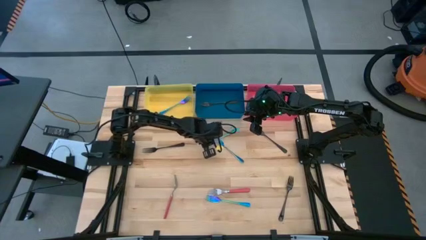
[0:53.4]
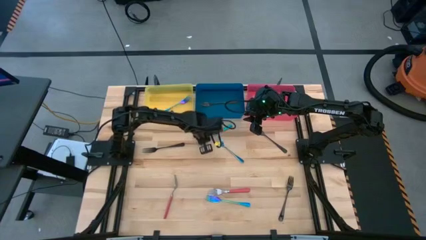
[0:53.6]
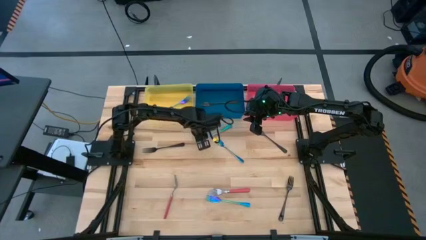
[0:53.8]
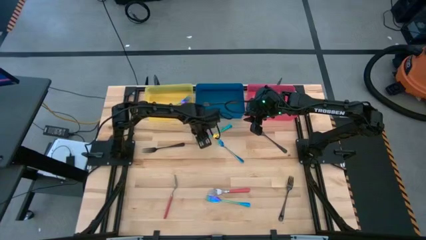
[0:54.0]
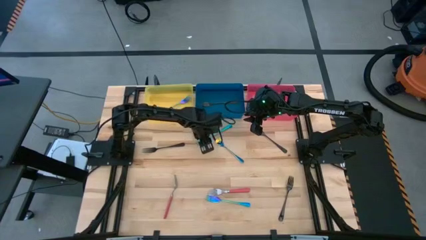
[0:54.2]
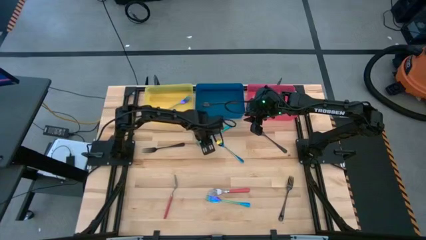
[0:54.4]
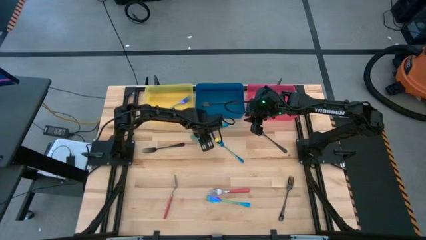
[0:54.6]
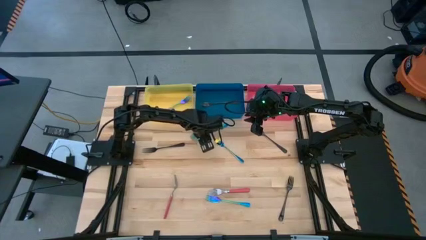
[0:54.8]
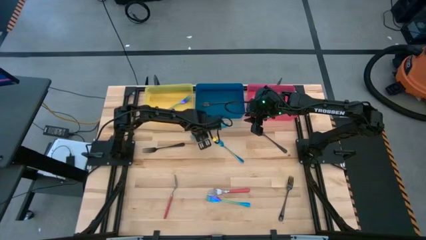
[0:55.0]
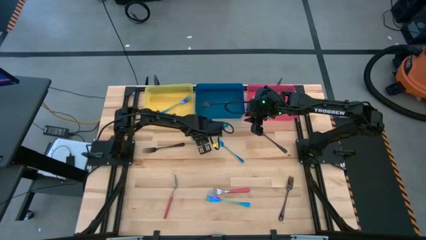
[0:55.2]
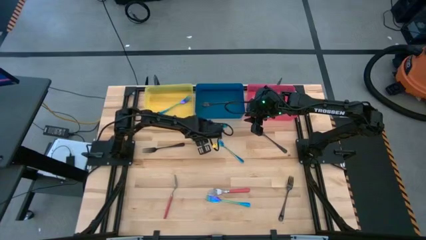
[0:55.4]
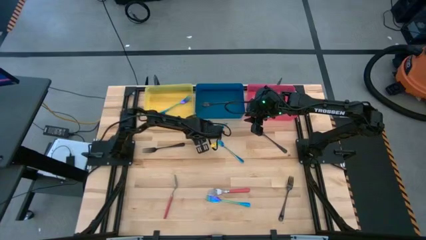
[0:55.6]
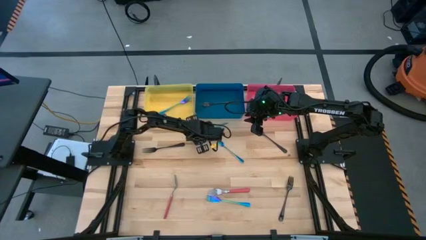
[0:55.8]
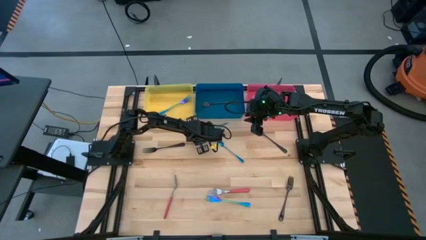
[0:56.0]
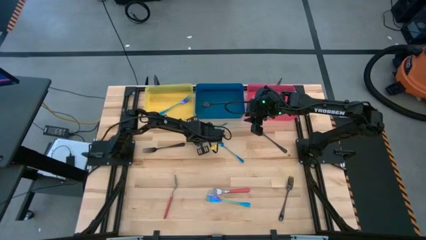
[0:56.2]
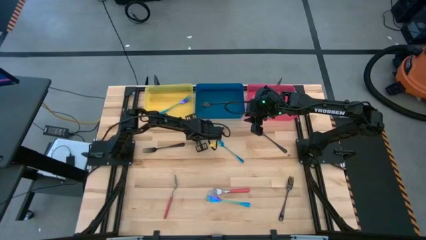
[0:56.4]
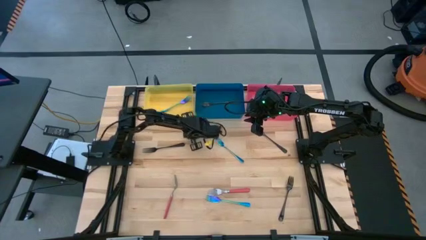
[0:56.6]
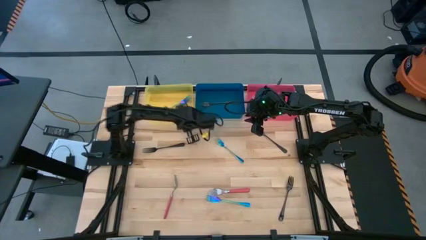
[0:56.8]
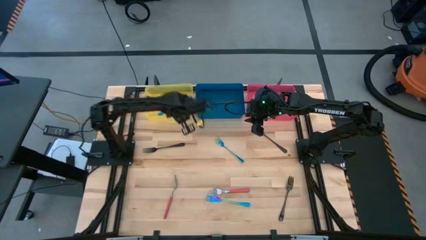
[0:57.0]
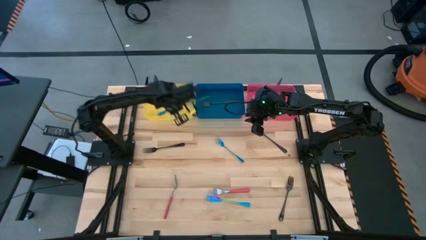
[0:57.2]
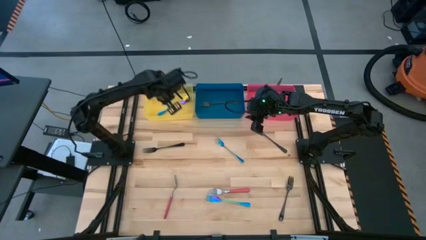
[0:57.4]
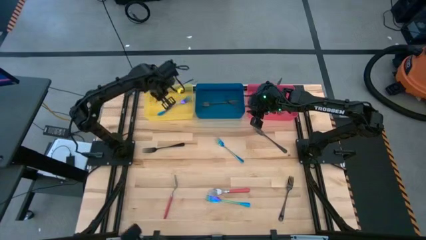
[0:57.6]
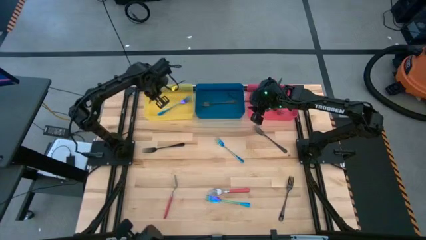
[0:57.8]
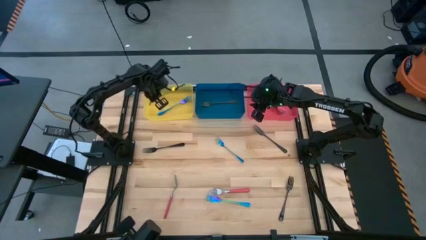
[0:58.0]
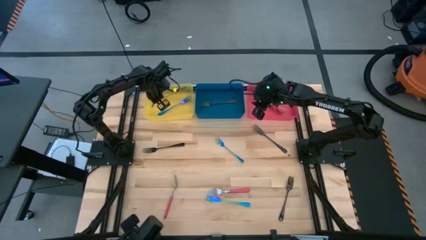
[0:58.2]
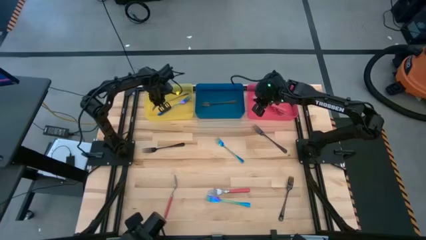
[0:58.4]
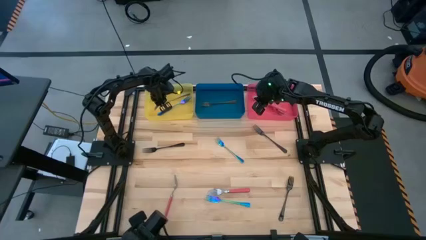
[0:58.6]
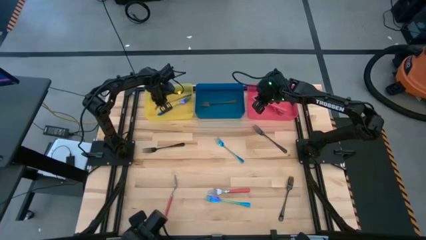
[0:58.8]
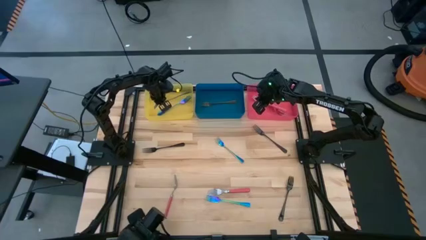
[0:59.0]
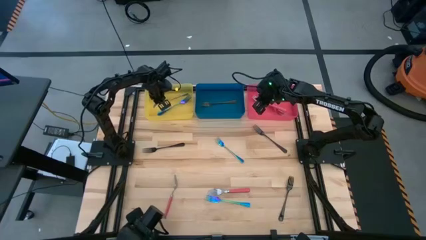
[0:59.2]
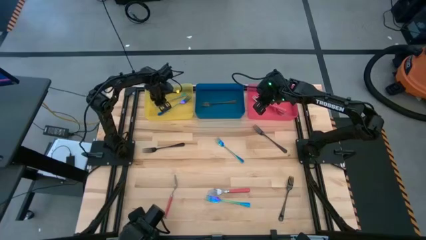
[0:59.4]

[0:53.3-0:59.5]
Task: Sort silverware by color (type)
Put the iridescent fork into the yellow bin

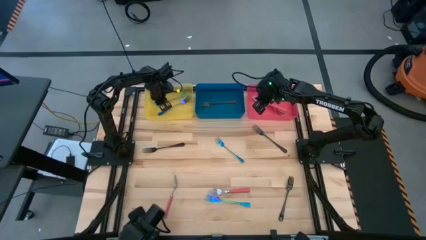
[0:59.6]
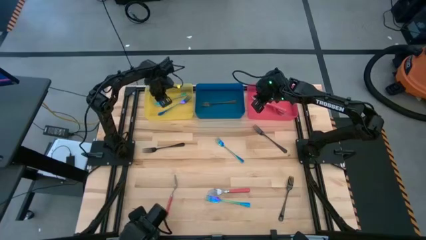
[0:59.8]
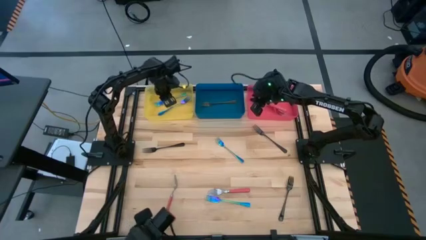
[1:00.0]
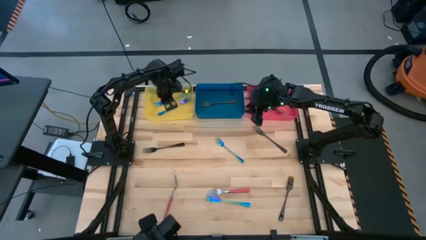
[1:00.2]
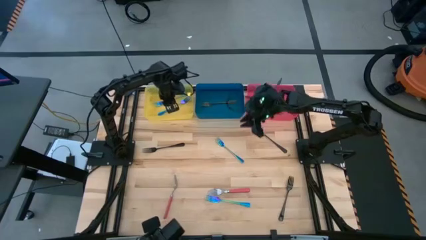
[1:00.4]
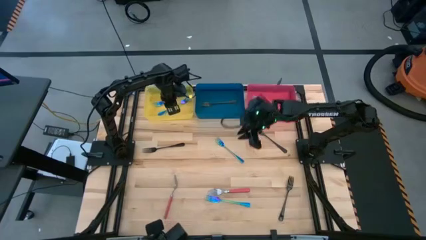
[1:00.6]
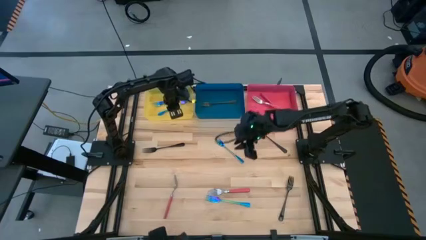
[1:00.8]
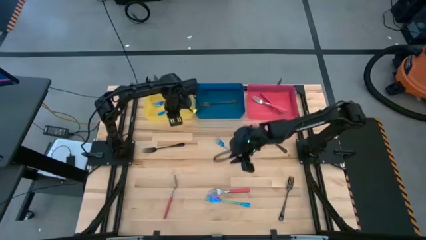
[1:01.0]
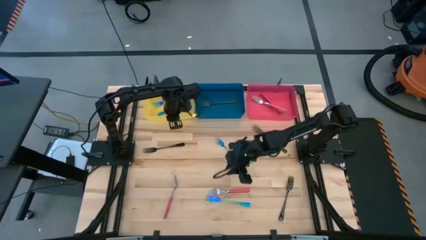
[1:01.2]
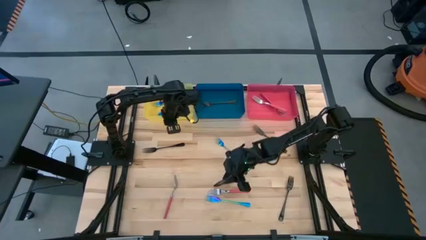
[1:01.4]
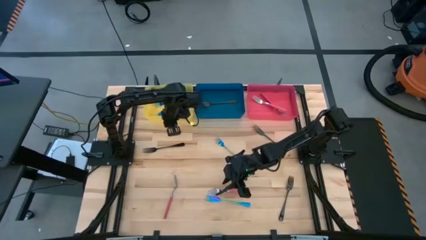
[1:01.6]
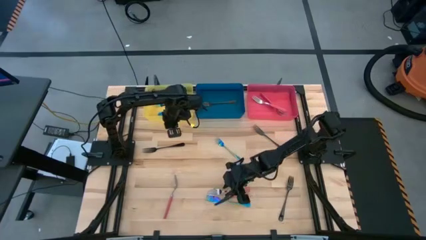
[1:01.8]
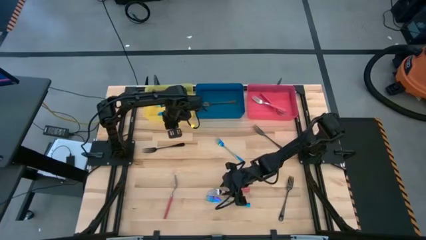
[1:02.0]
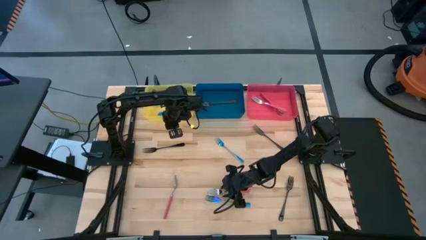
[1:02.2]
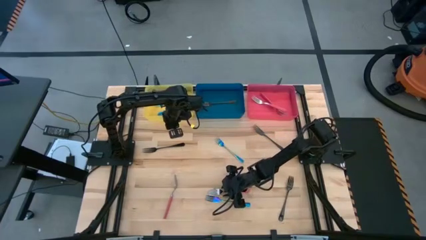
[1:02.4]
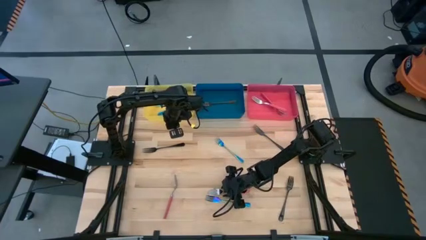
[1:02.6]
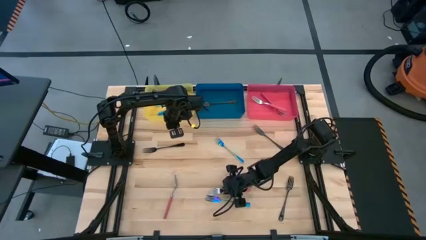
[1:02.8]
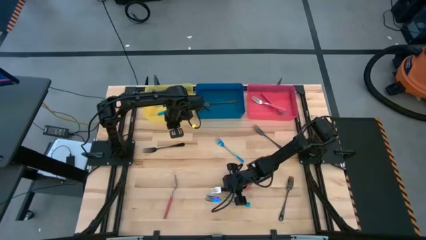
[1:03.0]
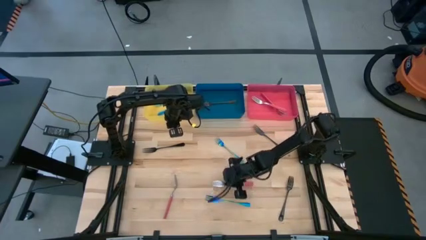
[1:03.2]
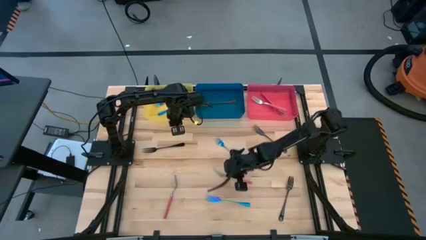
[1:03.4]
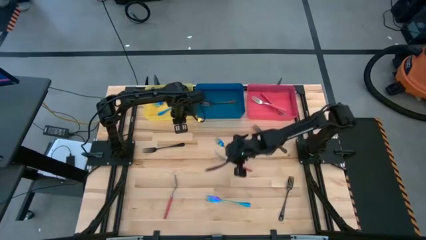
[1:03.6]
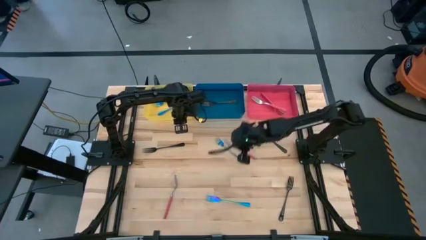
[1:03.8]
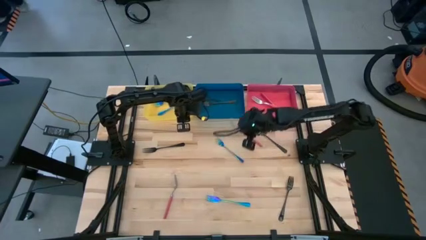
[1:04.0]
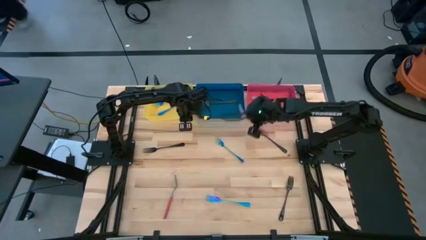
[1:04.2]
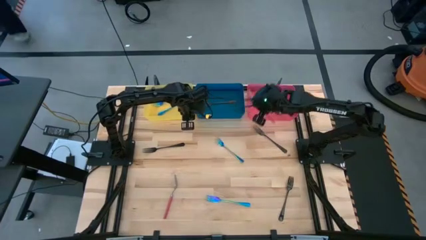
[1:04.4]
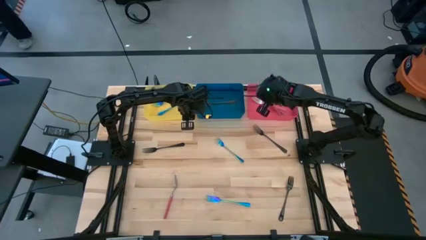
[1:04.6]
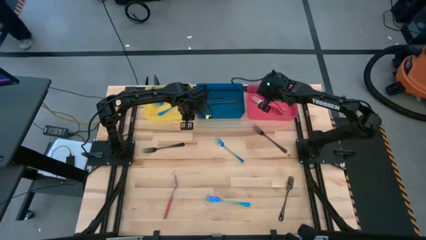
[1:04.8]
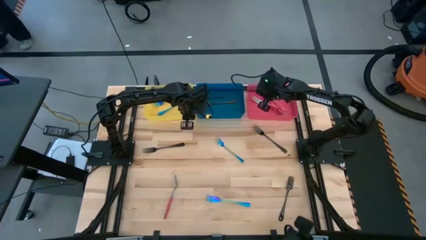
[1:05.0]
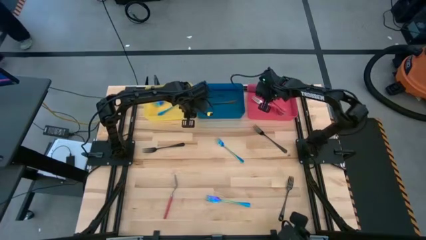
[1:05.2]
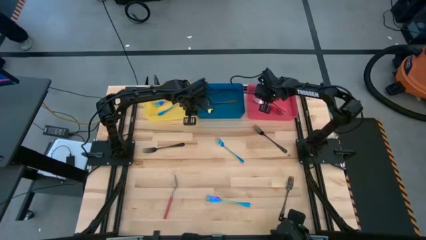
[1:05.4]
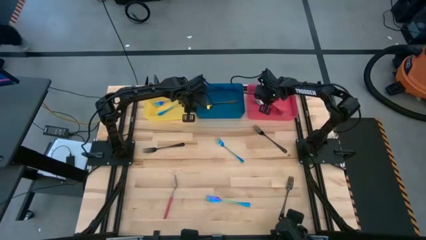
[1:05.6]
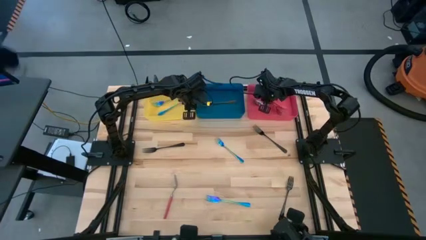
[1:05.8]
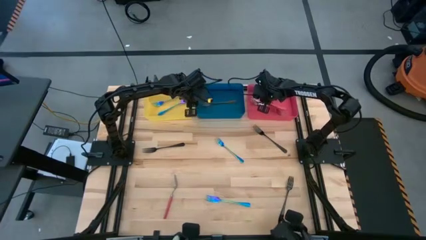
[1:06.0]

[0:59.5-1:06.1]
Put the pink fork into the pink bin

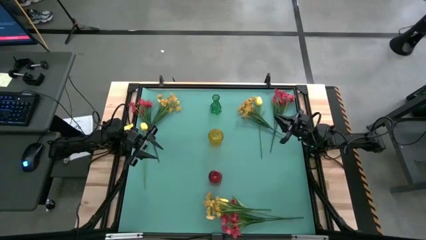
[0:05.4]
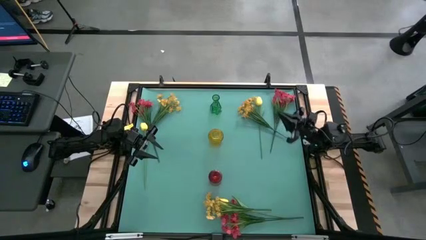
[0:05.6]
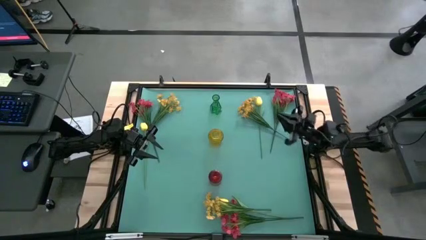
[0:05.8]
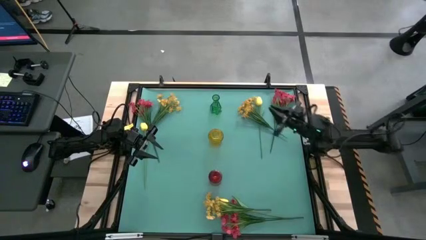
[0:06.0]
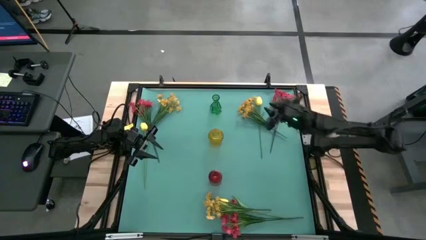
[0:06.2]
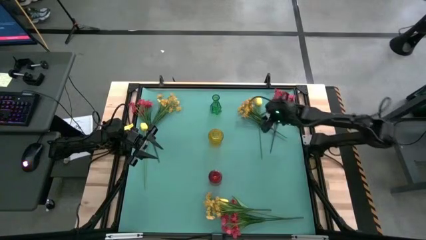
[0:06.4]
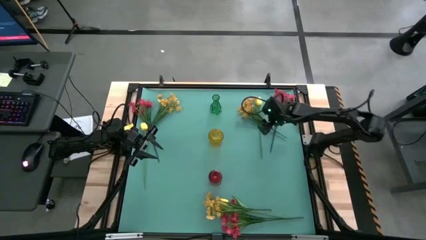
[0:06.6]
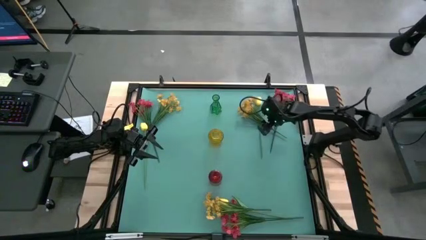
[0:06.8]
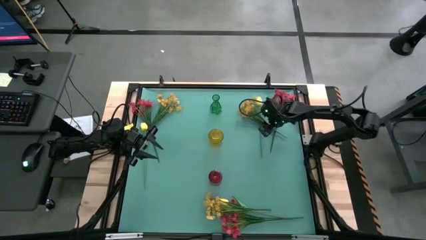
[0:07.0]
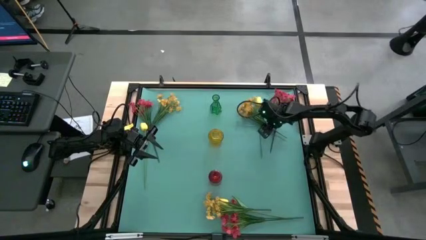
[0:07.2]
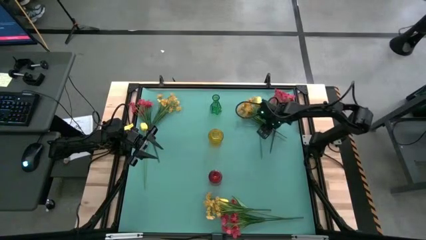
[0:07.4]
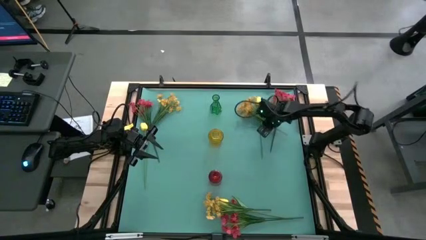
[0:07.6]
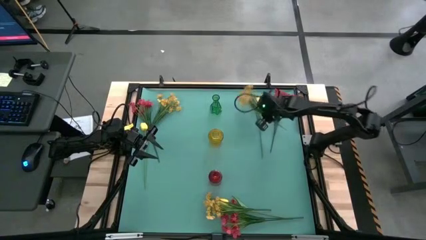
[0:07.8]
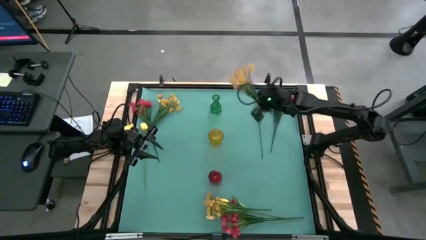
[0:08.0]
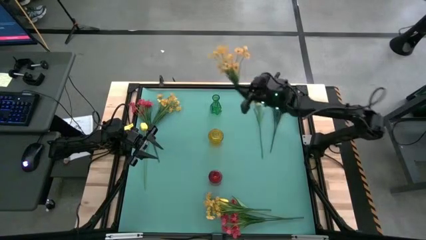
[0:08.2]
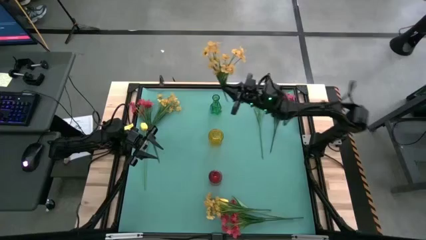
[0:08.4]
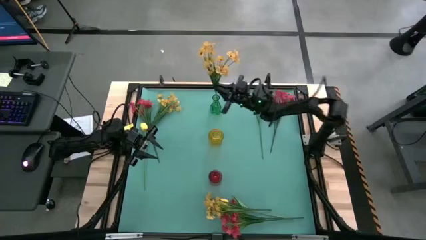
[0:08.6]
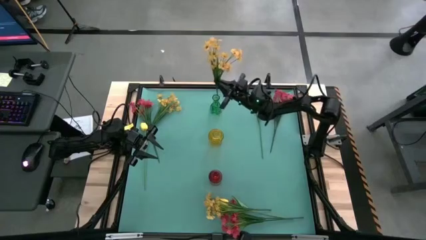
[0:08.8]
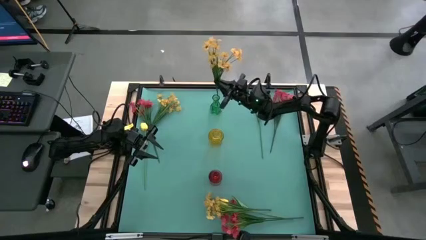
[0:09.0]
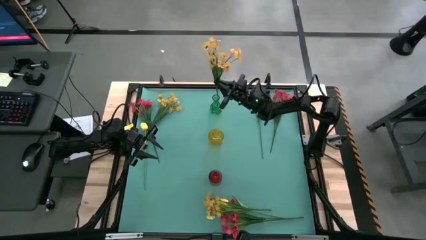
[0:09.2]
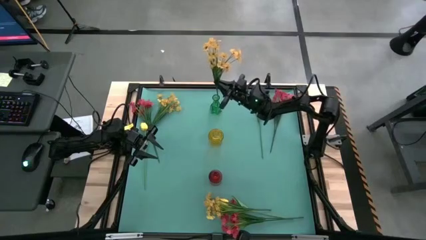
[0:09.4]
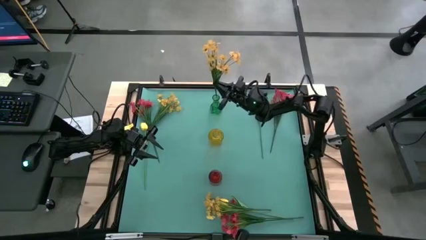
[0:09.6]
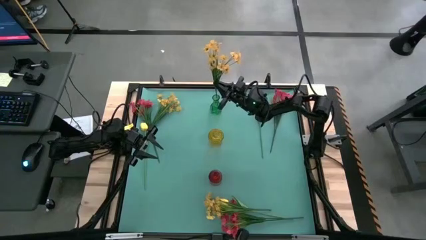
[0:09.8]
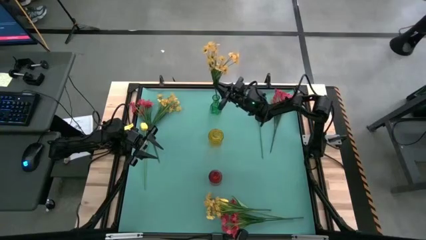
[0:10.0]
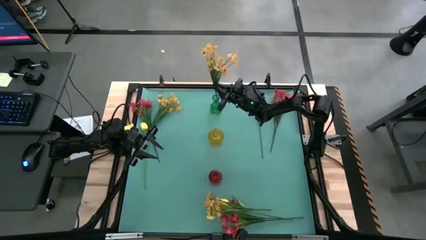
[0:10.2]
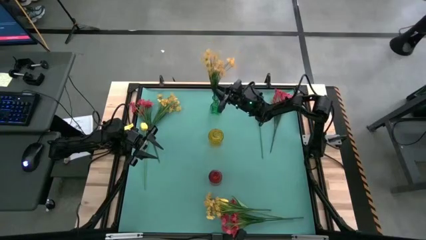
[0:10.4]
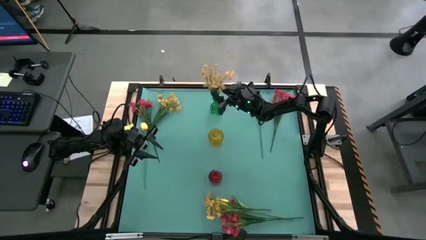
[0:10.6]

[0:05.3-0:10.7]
Task: Sort flowers into vase by color
Put the right yellow flowers into the green vase
